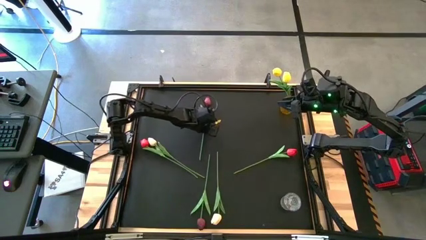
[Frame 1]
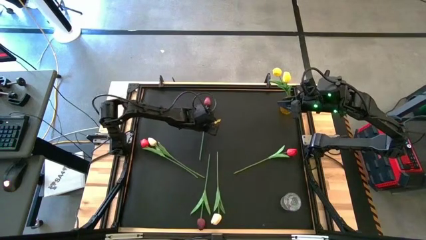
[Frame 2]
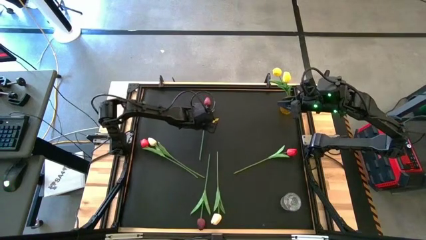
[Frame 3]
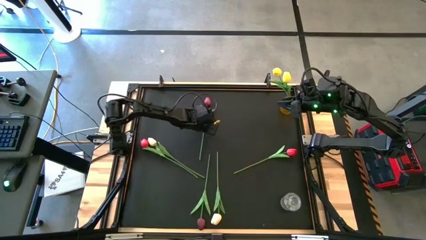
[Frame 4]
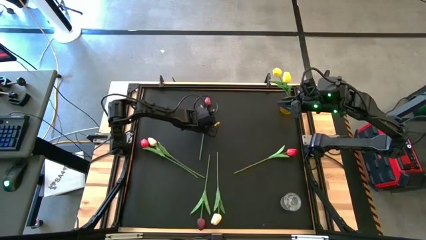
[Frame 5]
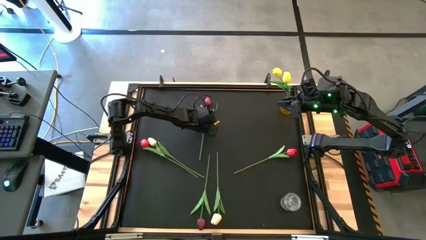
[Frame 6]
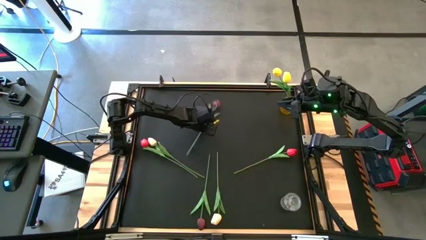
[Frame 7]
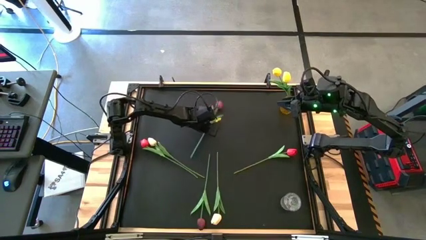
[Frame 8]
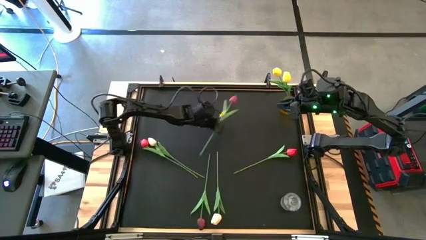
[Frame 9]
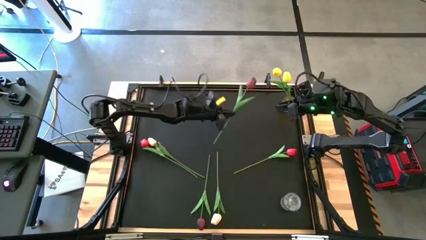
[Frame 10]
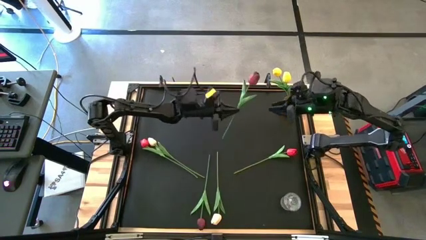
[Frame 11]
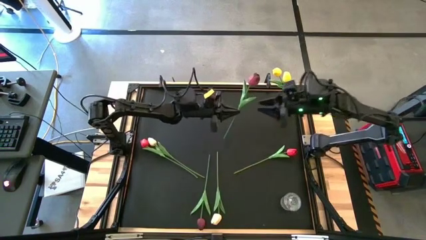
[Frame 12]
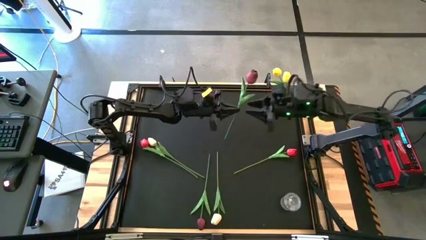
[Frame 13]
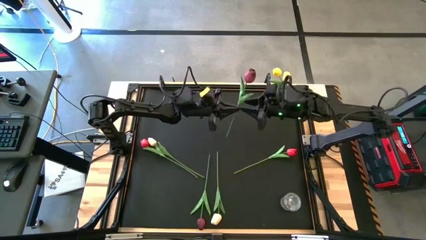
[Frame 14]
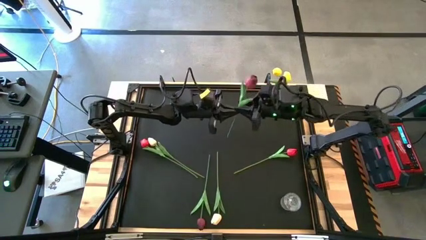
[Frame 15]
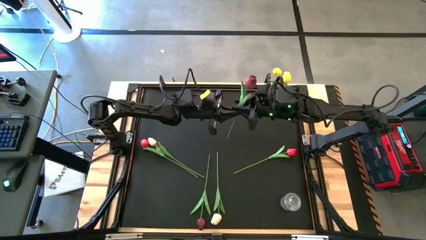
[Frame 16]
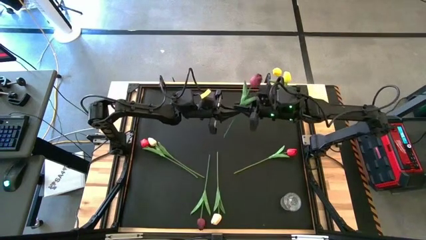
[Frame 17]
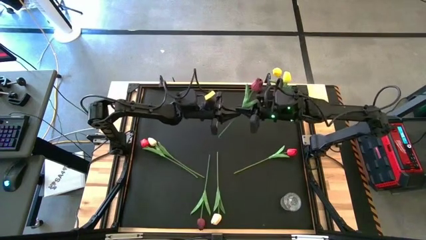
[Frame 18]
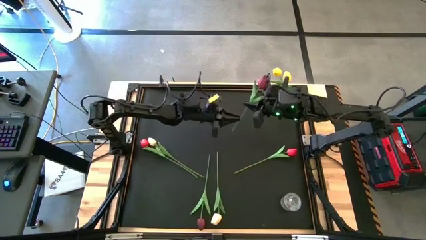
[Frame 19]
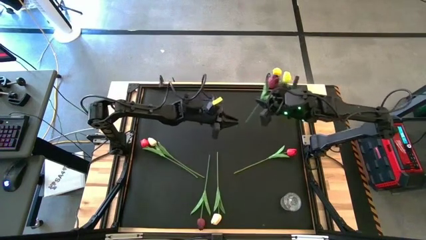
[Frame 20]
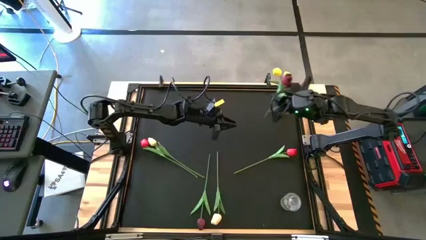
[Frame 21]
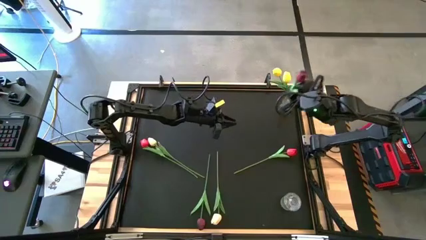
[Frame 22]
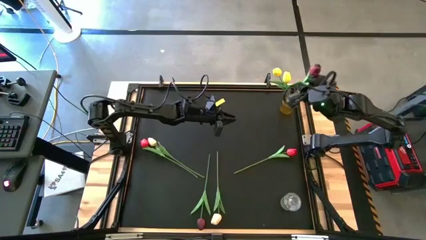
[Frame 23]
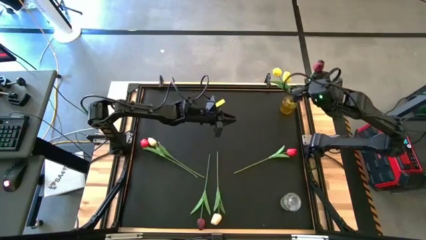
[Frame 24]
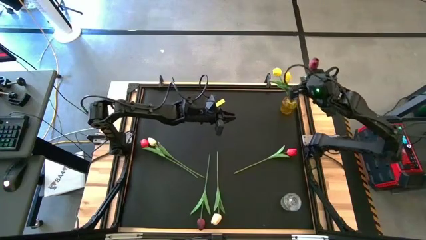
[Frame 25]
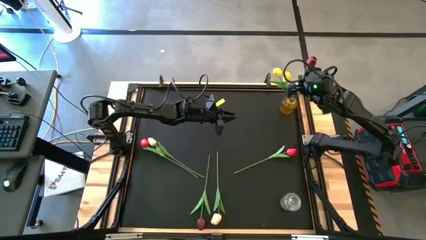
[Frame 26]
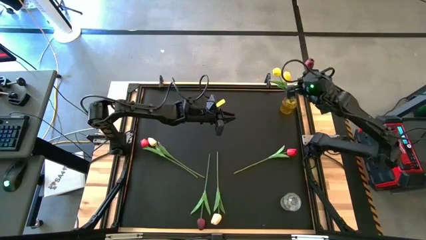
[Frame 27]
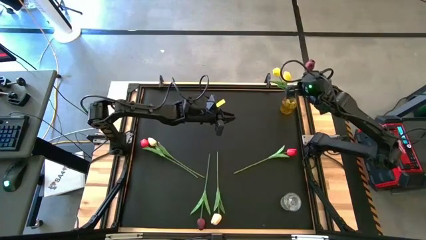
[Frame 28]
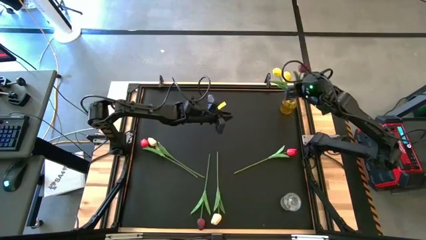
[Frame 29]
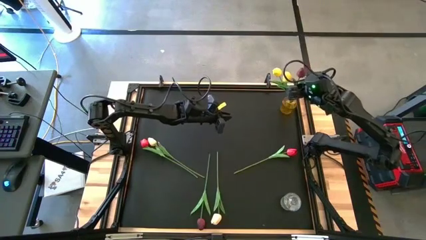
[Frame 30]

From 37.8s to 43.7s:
Task: Sort flowers into vase by color
Put the top dark red flower into the yellow vase

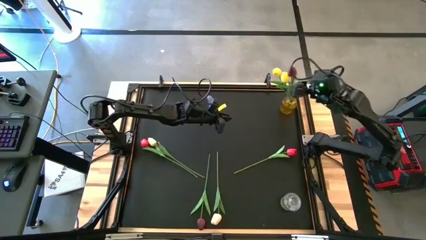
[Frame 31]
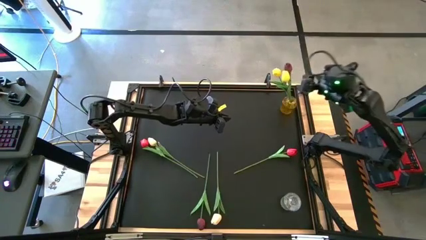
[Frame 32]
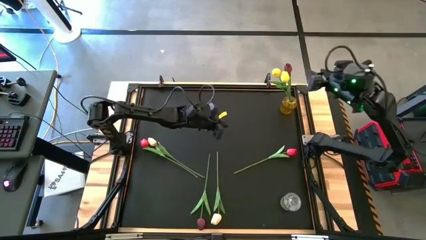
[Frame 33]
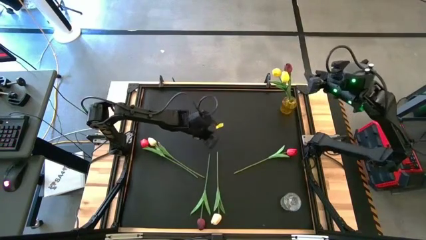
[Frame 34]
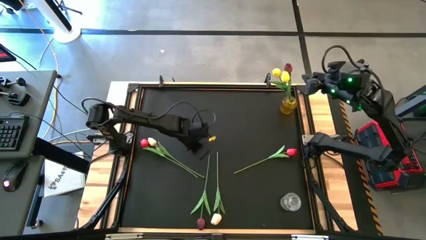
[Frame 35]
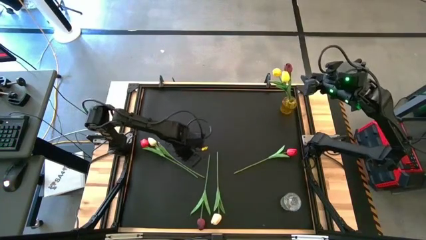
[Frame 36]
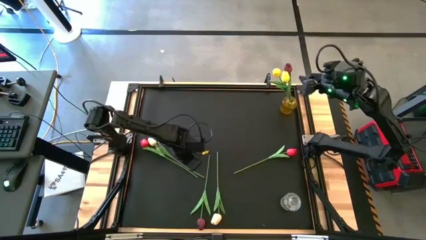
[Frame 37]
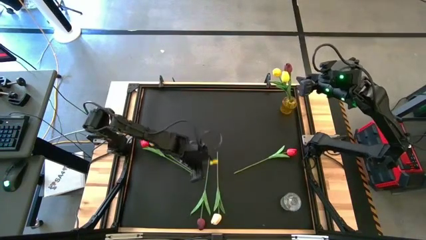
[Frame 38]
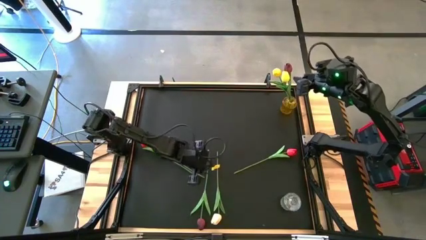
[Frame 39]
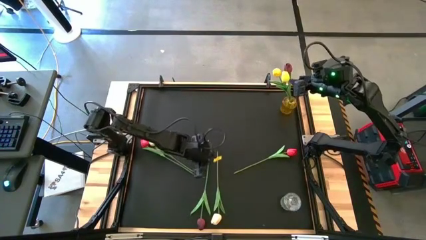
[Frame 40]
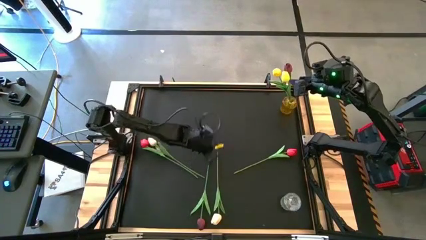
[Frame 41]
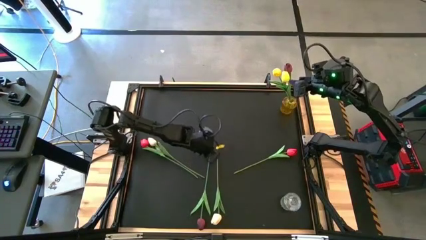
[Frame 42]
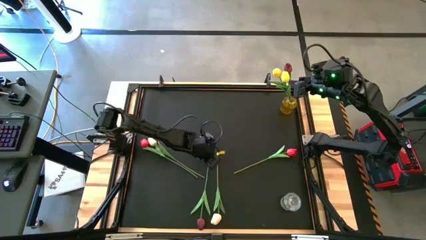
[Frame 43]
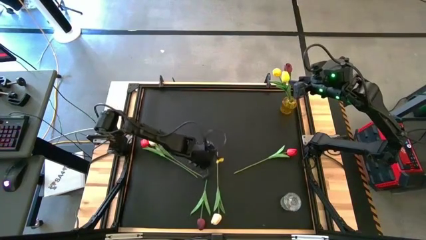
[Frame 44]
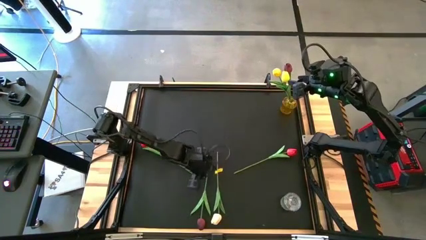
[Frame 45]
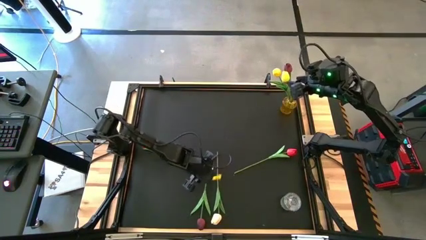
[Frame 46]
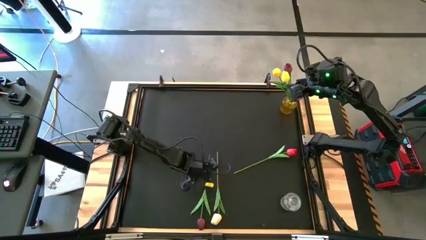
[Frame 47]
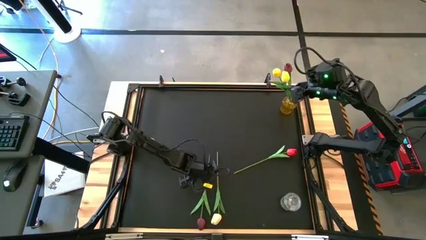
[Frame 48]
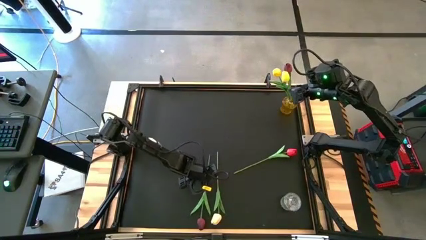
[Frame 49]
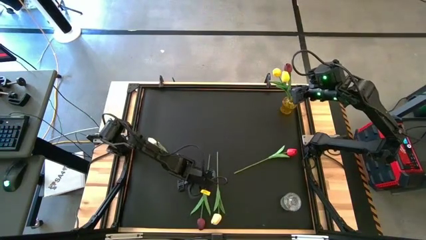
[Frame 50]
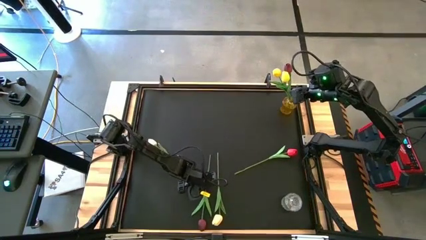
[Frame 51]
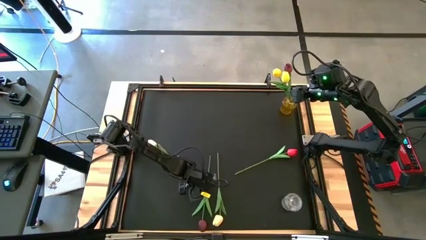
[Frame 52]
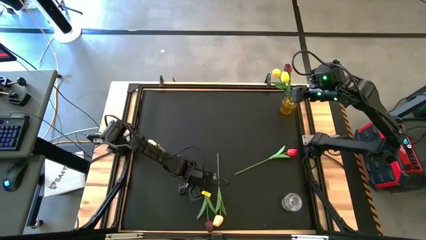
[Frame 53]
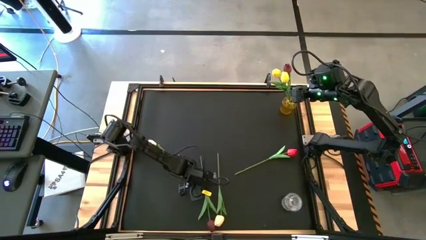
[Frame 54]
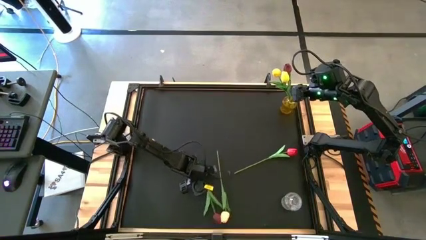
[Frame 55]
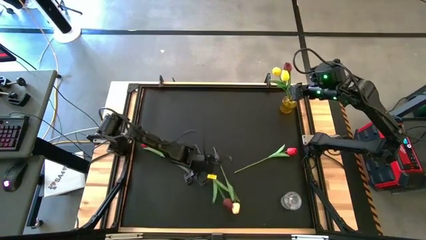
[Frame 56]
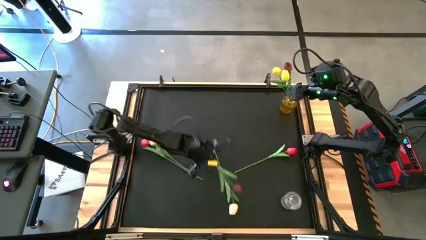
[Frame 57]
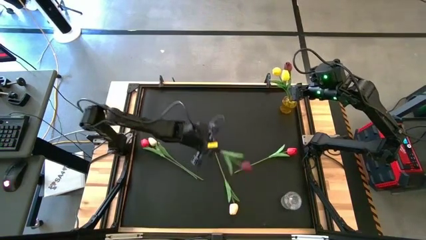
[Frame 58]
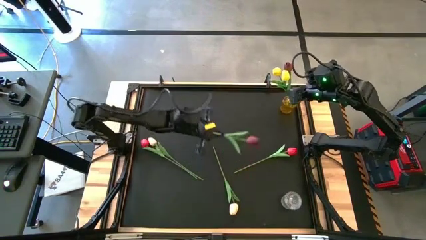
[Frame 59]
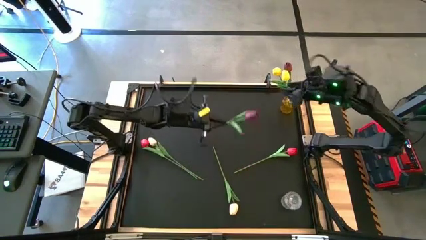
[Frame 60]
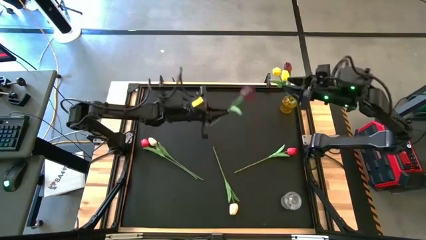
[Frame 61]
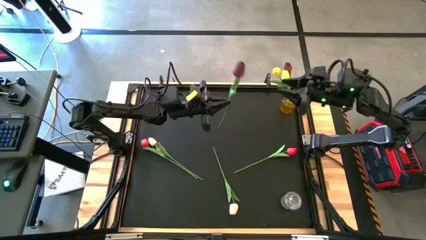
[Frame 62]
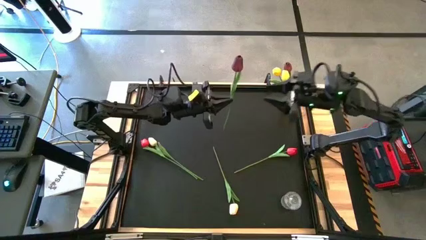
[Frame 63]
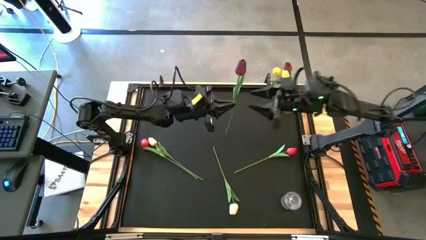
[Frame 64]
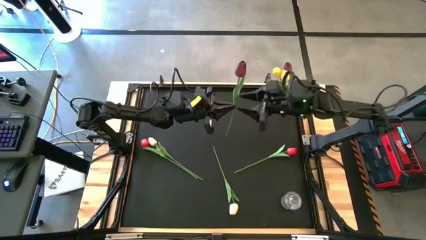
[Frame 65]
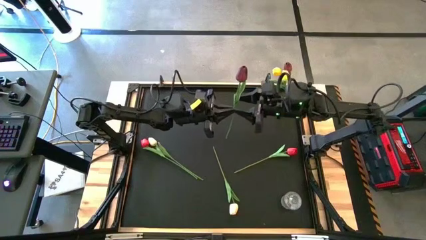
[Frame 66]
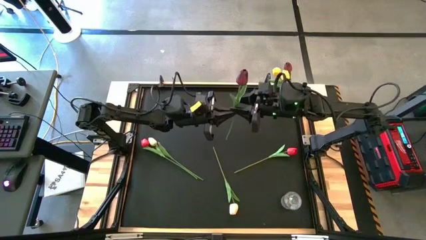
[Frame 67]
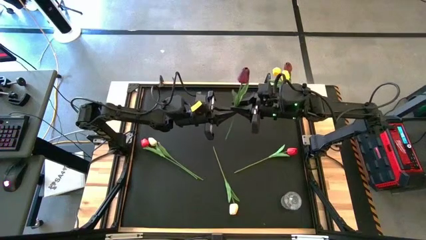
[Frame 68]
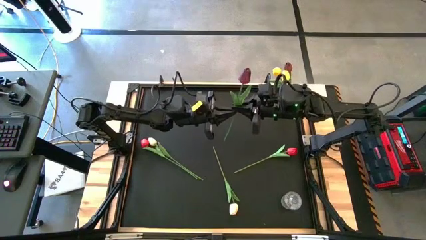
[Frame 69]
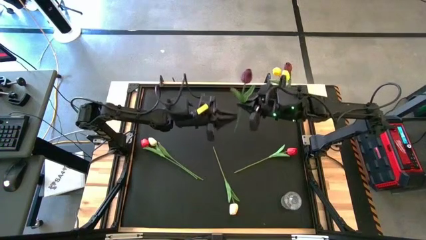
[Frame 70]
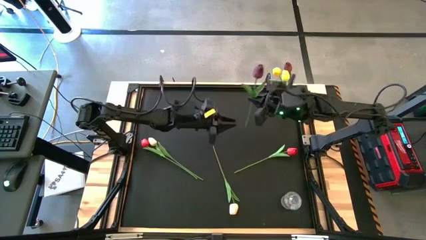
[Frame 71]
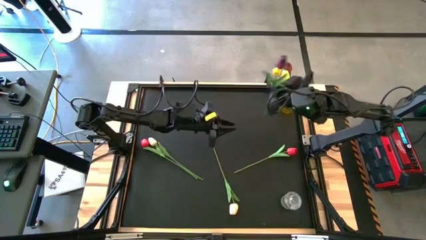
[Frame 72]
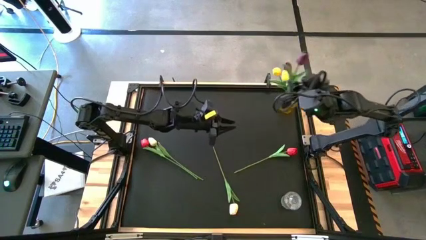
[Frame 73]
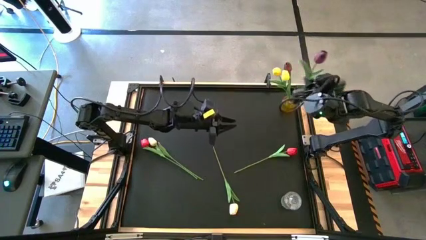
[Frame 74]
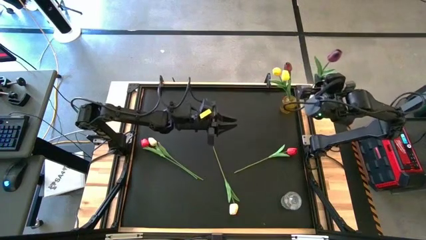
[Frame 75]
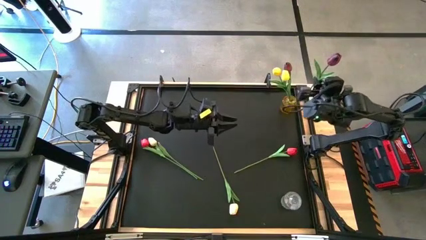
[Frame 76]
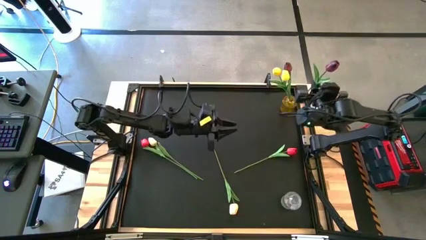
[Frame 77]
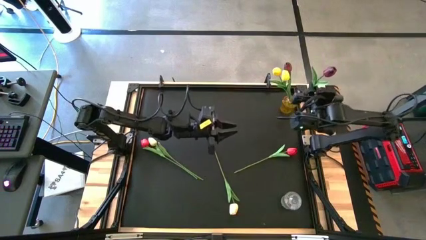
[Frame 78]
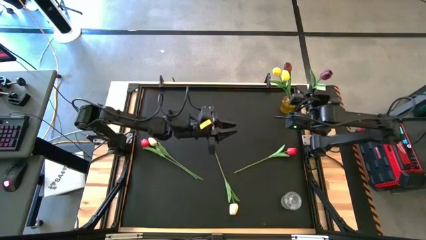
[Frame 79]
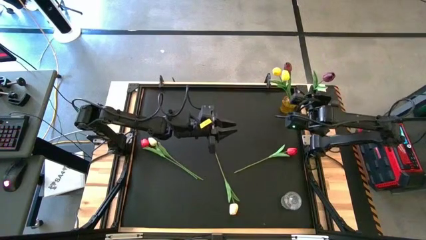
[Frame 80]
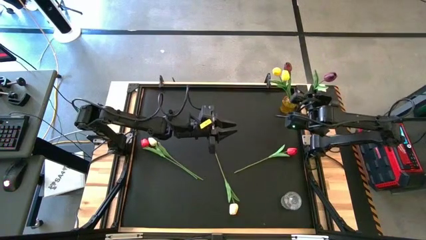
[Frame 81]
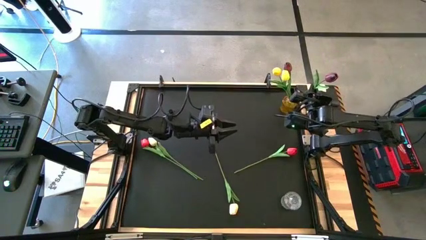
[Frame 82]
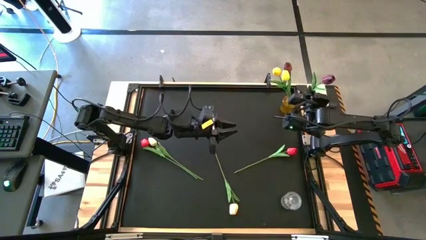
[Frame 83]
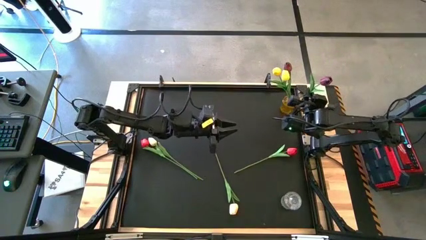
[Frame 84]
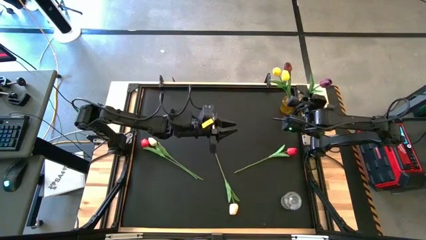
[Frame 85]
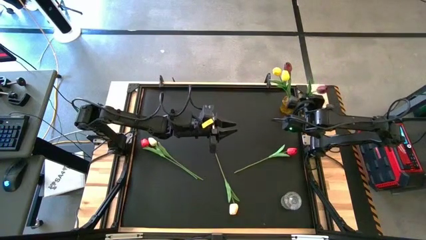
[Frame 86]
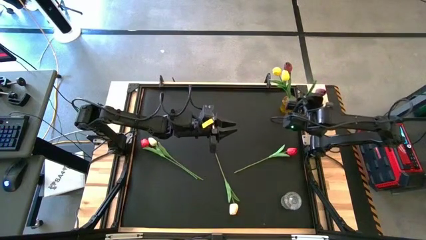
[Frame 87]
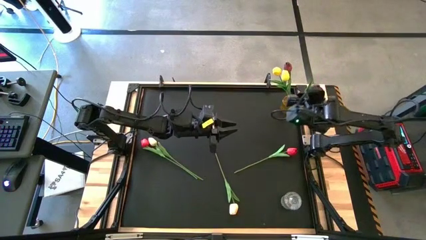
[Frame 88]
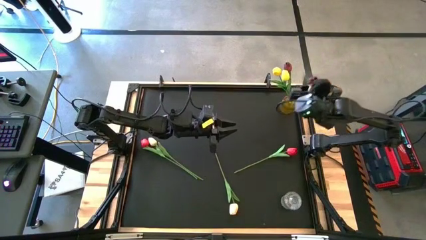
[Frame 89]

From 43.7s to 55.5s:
Put the dark red flower into the yellow vase
